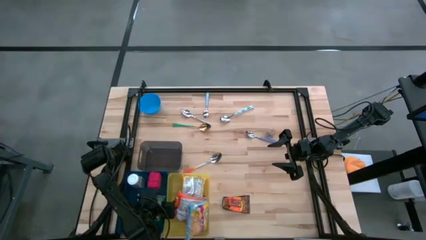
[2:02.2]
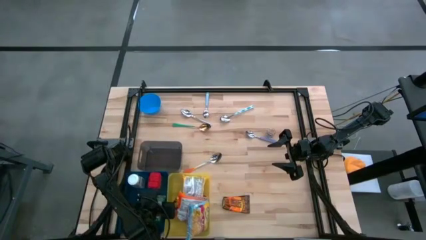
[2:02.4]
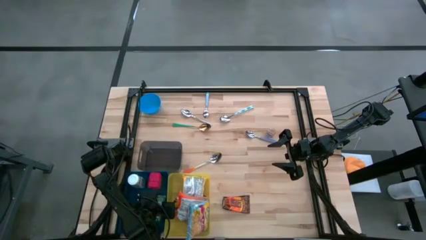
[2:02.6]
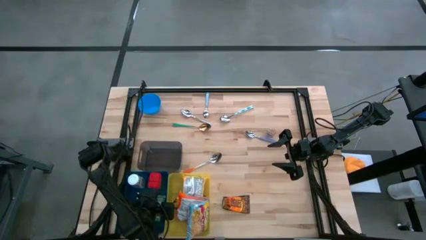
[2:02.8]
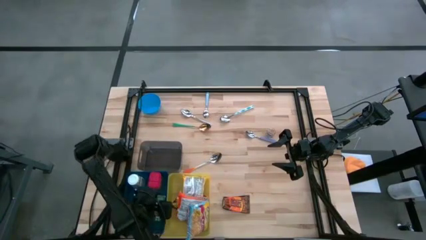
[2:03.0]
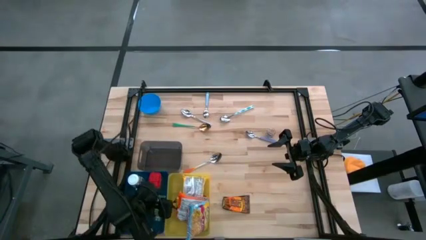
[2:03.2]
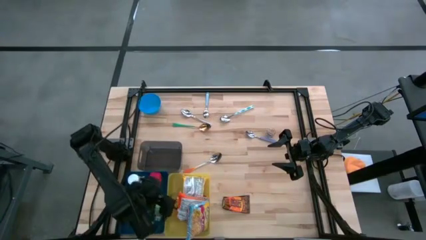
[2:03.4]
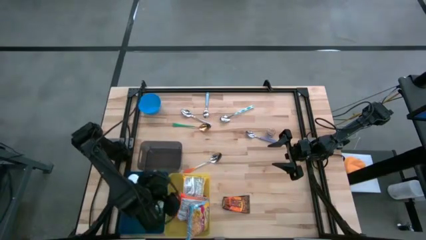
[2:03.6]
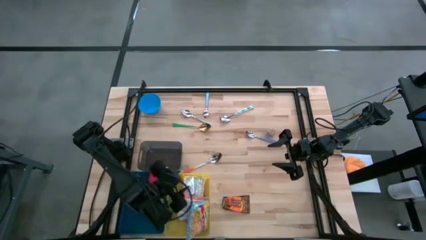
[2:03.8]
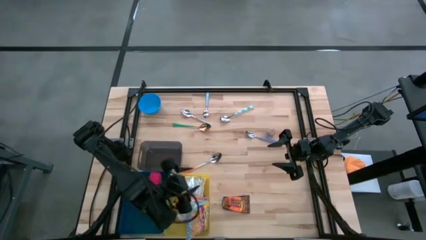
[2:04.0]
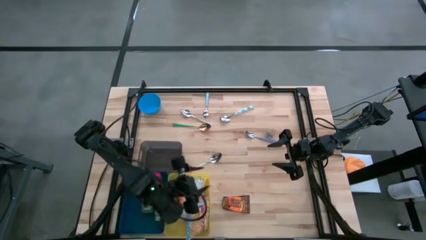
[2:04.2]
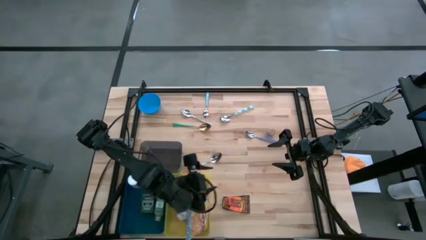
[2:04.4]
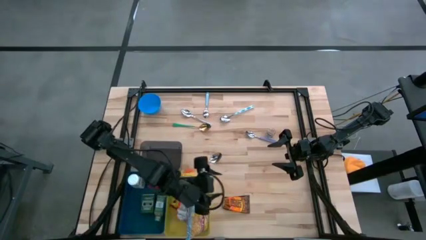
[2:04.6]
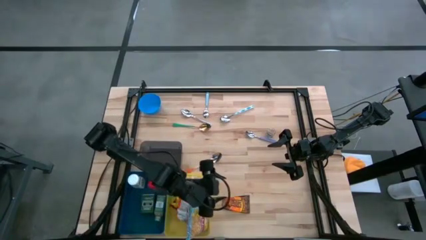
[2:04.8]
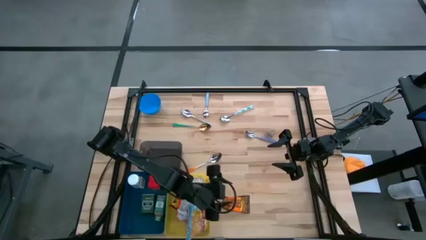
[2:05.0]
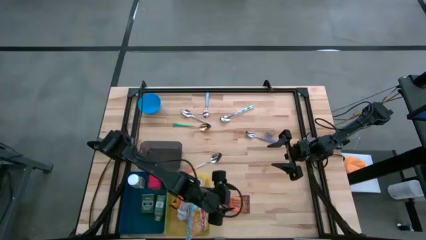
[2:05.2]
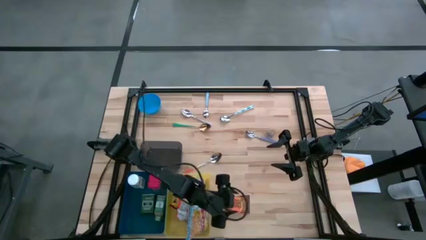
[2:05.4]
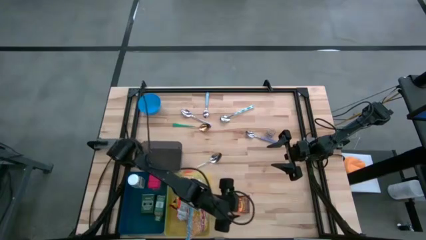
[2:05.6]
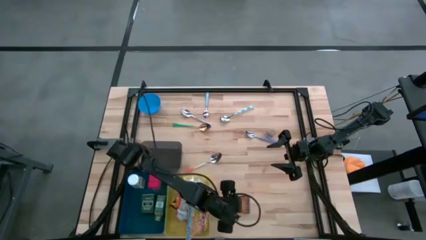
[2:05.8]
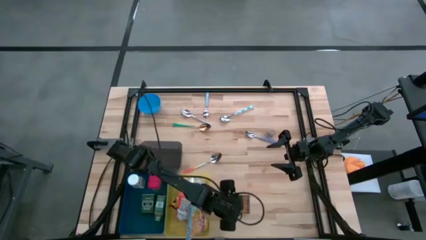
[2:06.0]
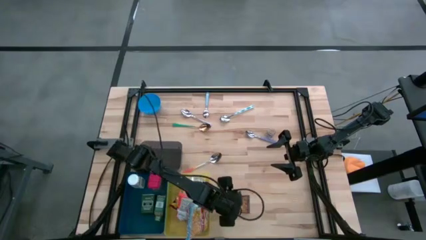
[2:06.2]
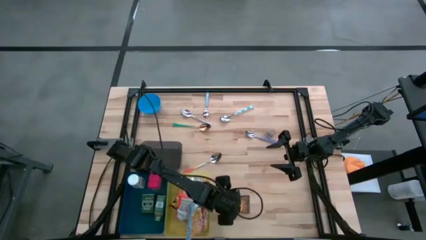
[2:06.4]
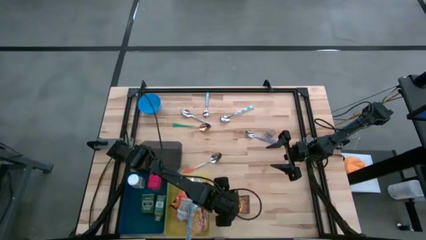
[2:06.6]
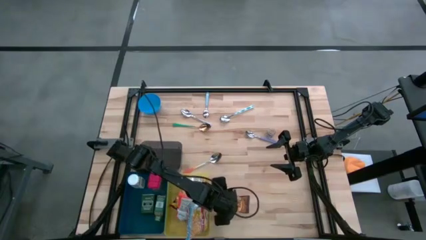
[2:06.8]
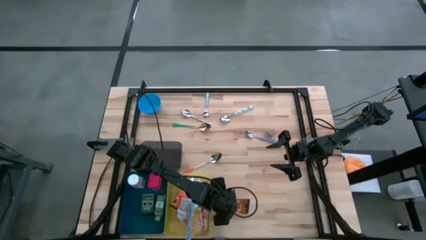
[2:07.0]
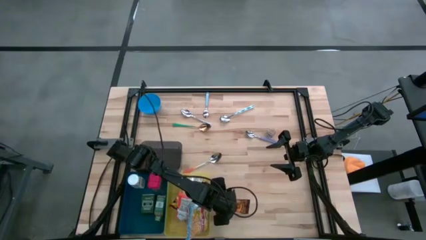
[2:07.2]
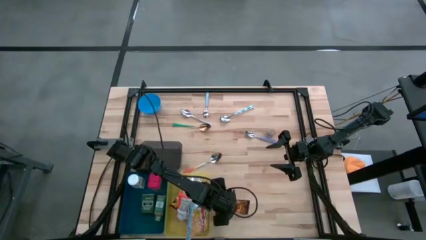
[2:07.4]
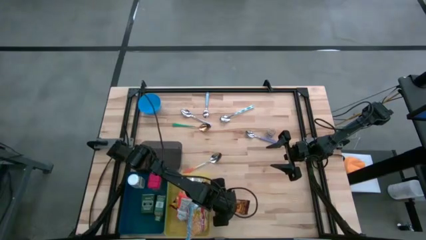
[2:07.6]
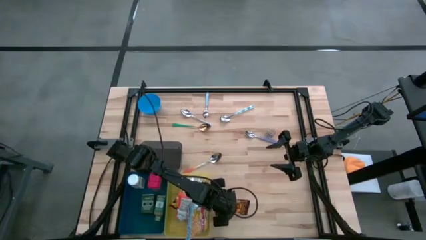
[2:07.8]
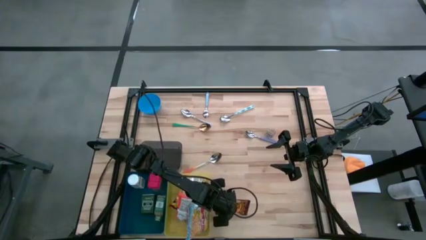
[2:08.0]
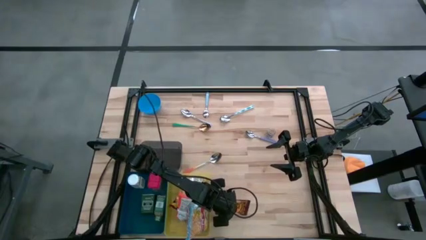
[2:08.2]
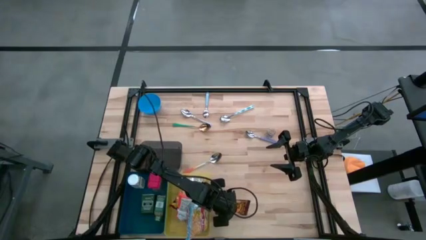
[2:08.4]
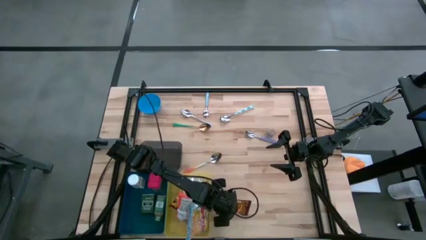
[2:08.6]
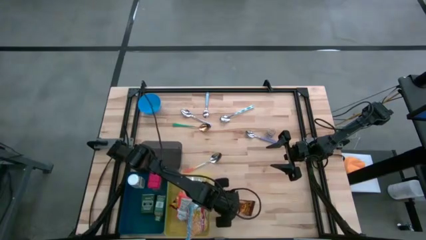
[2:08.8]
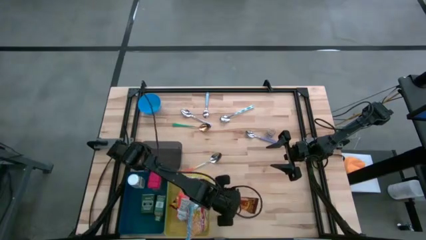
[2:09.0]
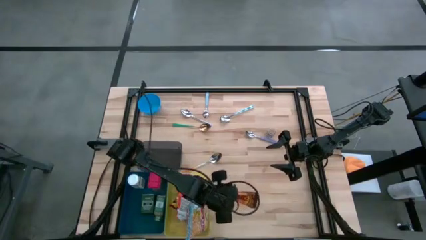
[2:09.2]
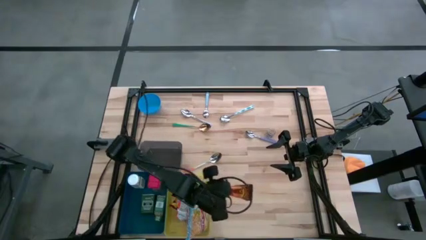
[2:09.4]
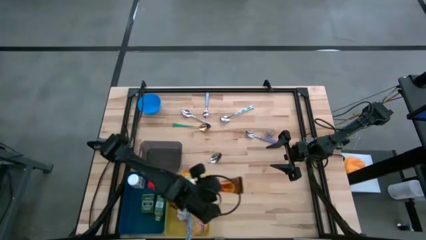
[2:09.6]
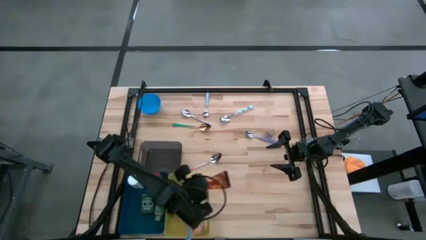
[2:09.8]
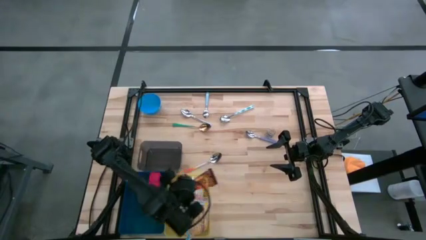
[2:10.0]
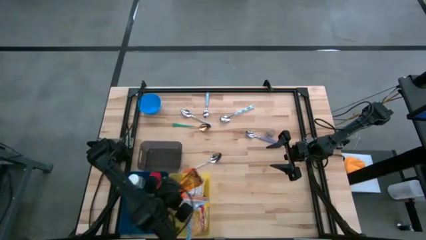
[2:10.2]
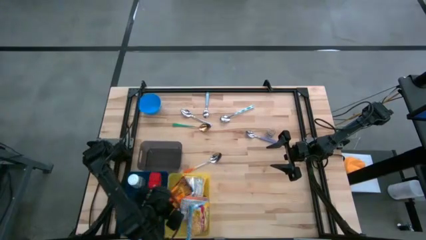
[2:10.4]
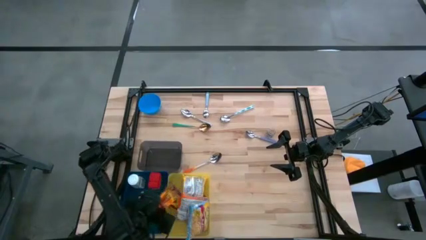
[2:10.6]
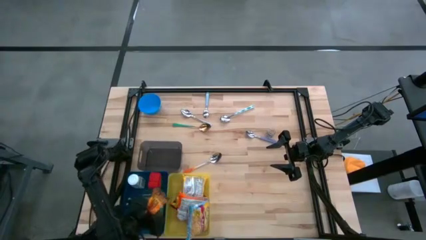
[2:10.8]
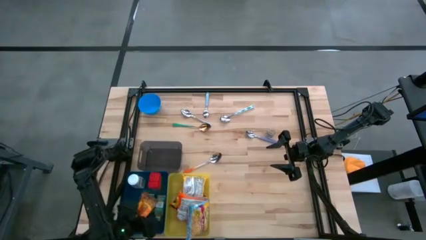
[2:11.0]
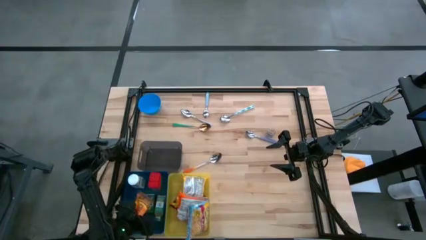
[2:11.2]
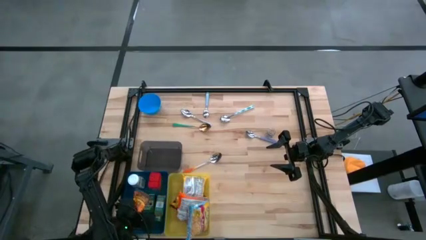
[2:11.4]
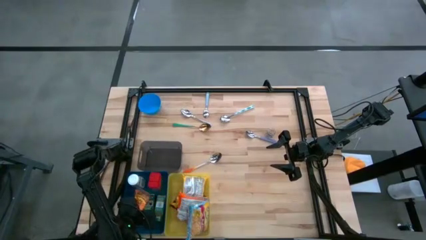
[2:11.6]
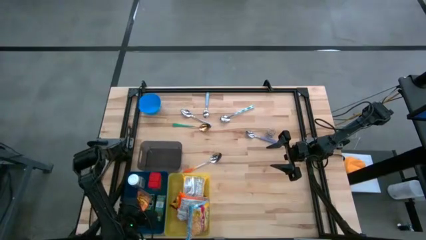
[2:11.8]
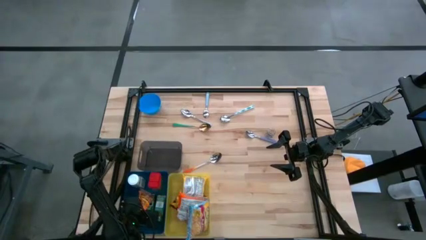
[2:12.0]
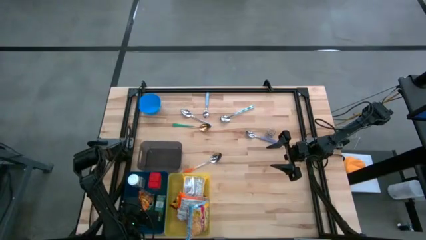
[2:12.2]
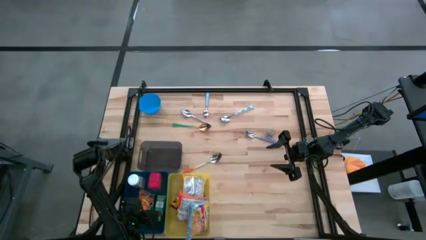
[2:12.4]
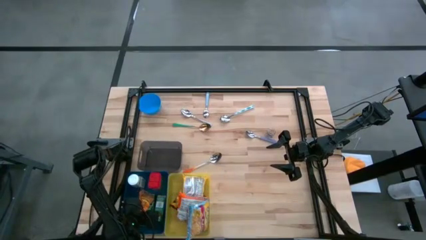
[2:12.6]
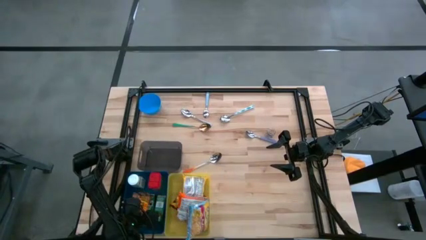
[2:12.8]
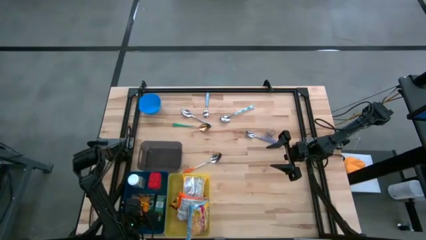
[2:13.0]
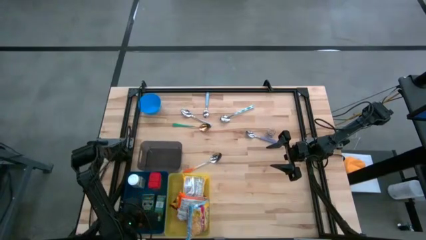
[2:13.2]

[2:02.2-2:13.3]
Put the orange seasoning pack into the blue bin

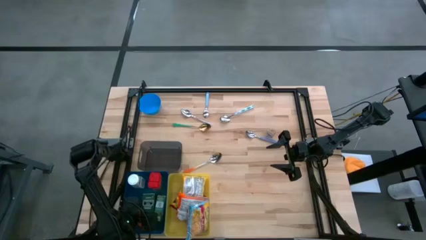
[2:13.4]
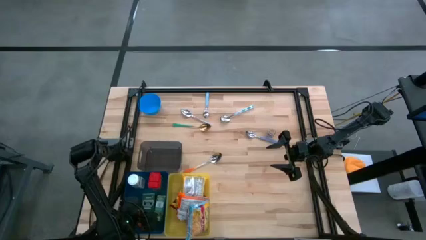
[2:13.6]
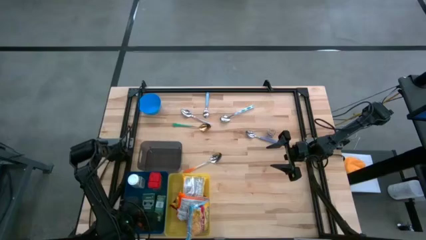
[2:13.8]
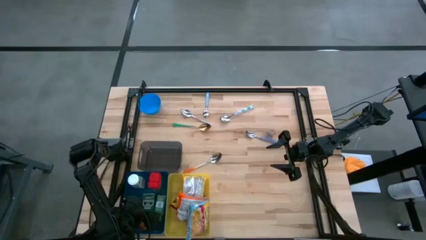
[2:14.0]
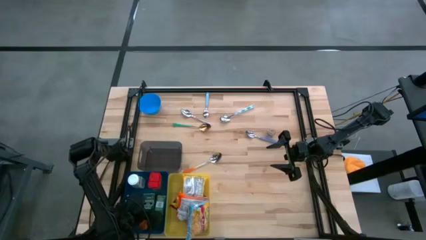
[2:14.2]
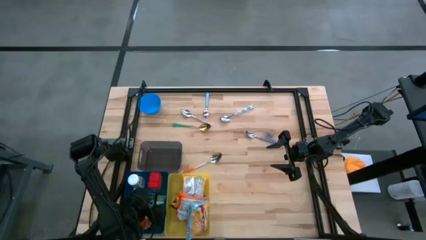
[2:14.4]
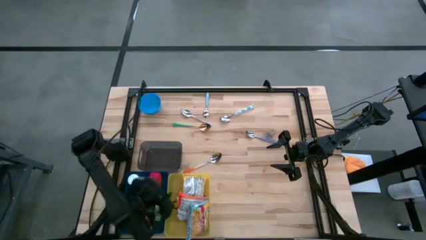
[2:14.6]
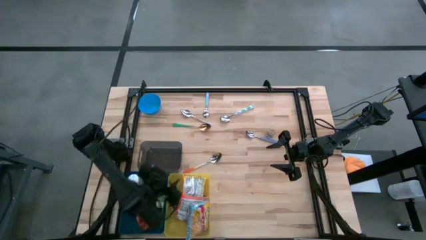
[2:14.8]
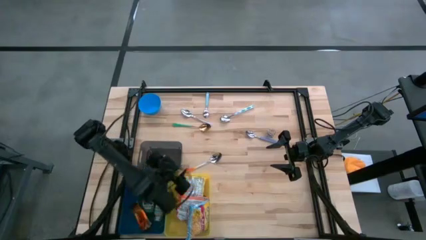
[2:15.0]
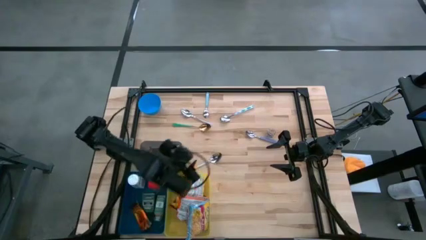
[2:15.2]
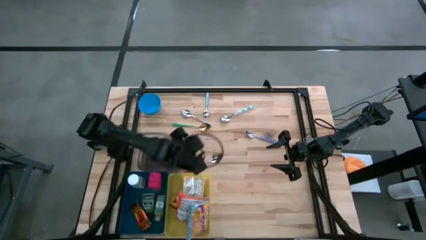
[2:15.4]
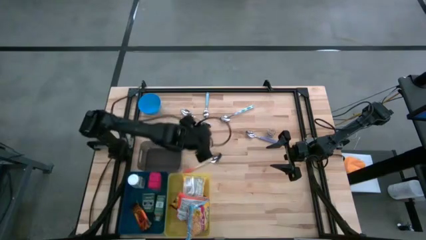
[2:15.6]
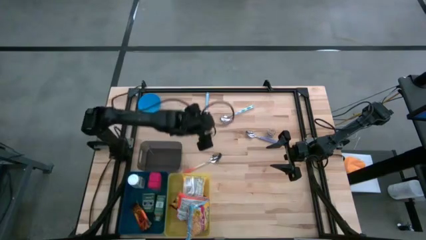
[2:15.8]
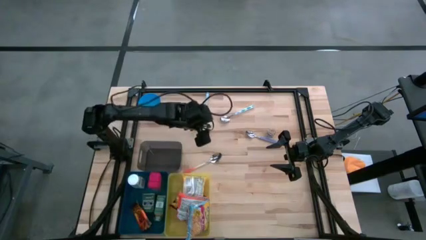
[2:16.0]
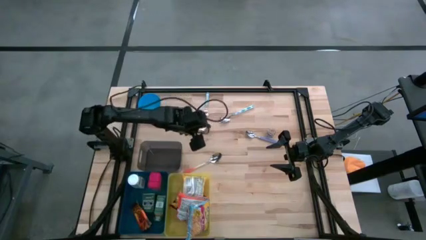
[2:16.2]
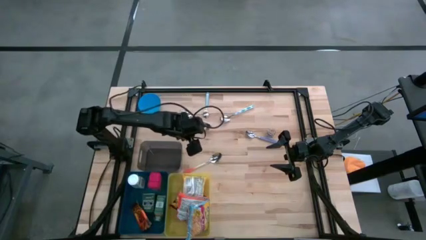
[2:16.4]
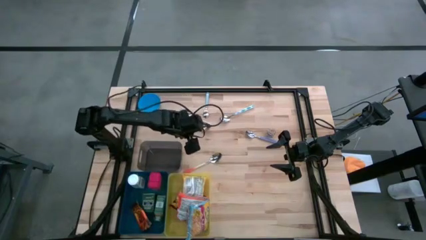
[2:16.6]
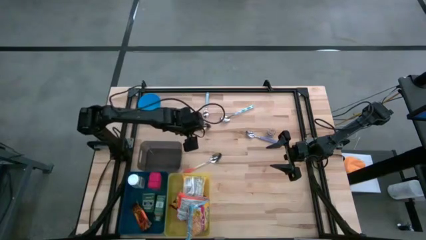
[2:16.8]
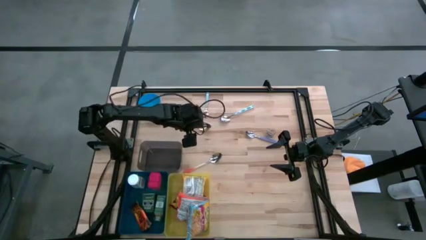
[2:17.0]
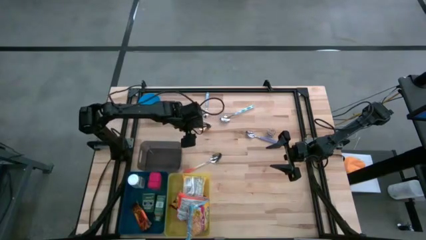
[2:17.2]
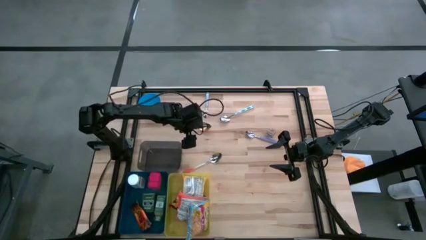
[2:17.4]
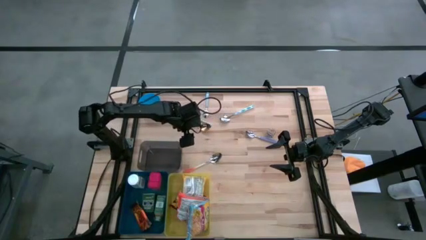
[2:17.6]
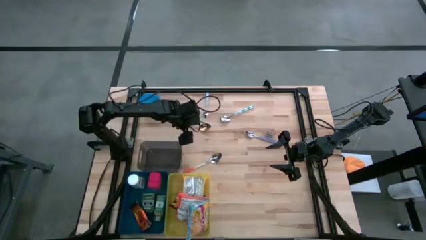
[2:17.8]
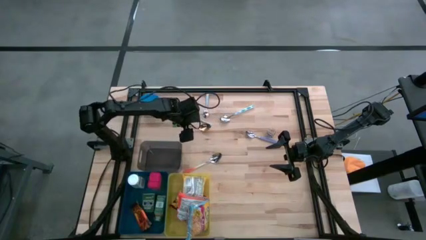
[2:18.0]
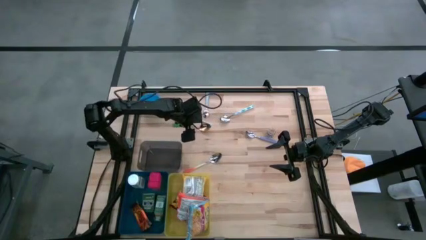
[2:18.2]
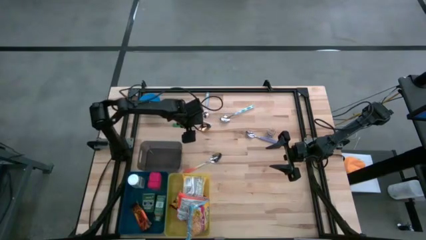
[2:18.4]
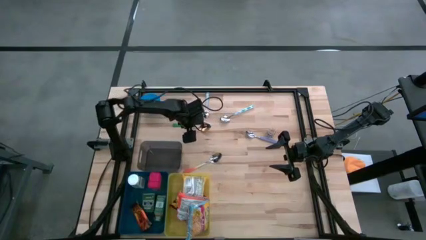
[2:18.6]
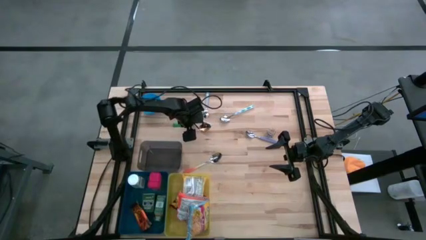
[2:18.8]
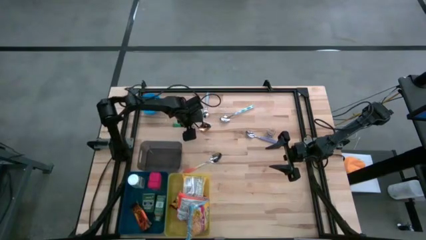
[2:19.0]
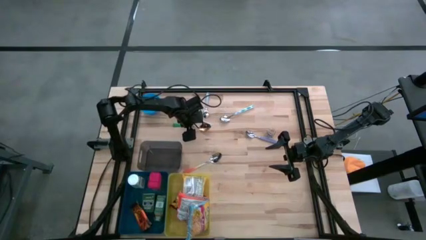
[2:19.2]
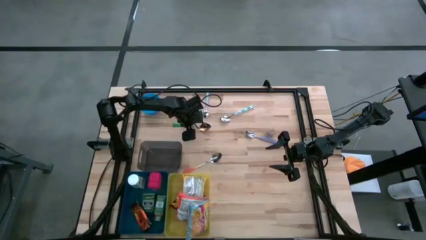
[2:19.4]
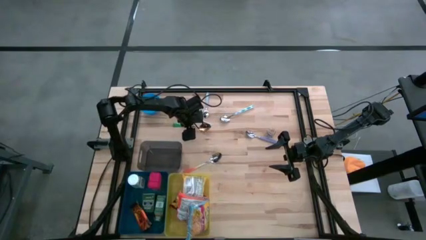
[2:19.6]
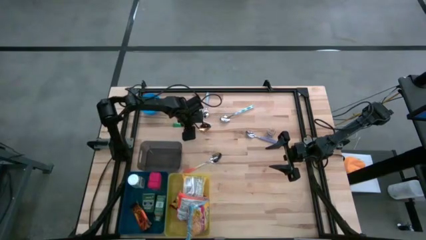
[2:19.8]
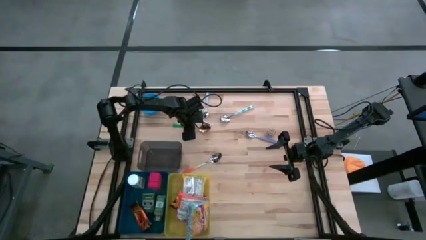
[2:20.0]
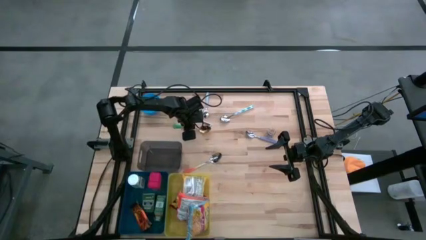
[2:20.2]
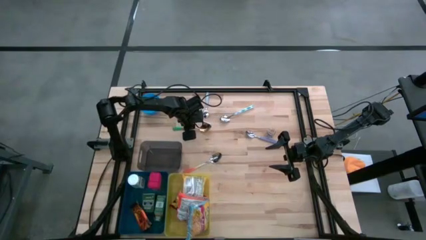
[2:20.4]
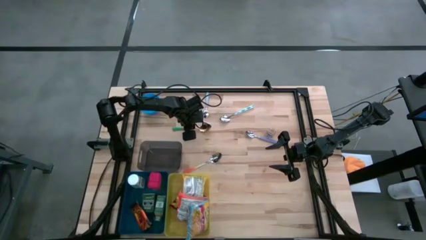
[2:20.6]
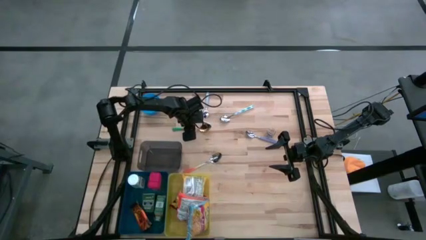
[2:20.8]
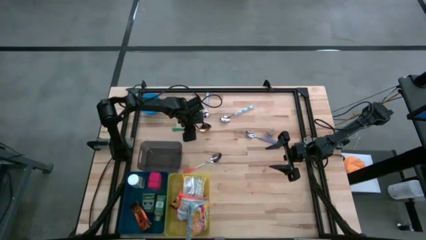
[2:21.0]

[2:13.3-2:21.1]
Put the green spoon into the gray bin
